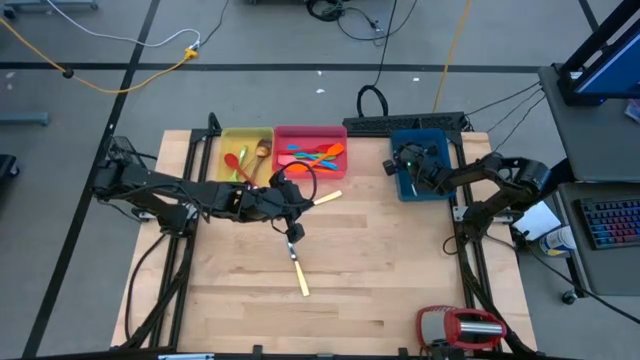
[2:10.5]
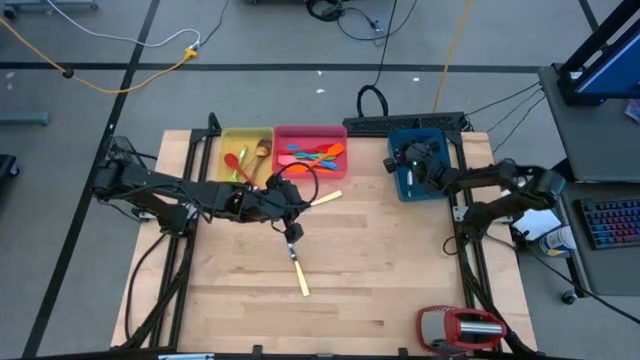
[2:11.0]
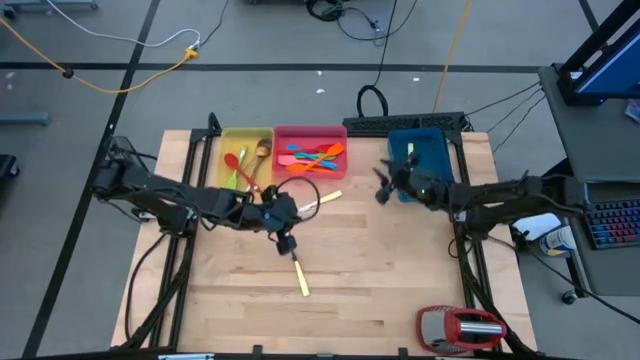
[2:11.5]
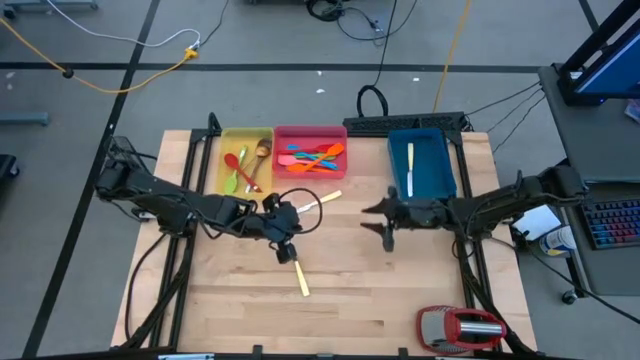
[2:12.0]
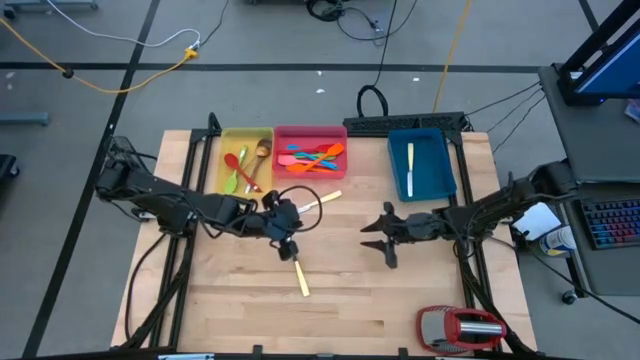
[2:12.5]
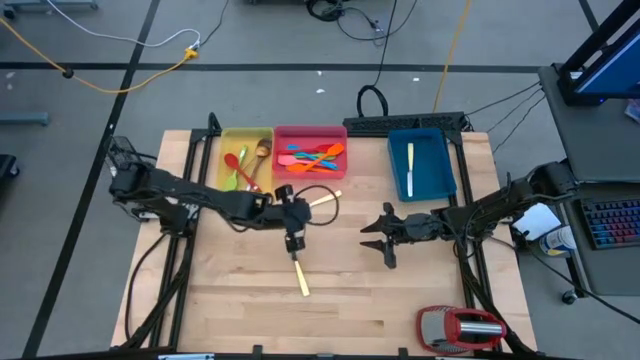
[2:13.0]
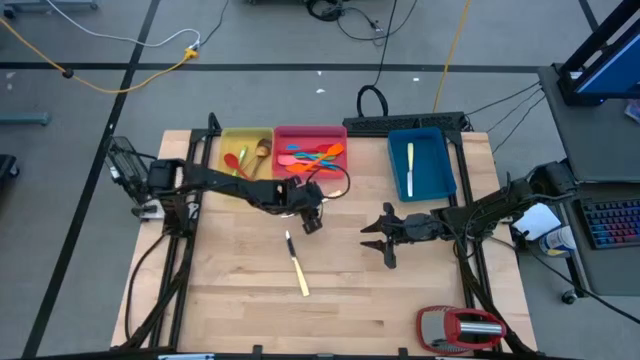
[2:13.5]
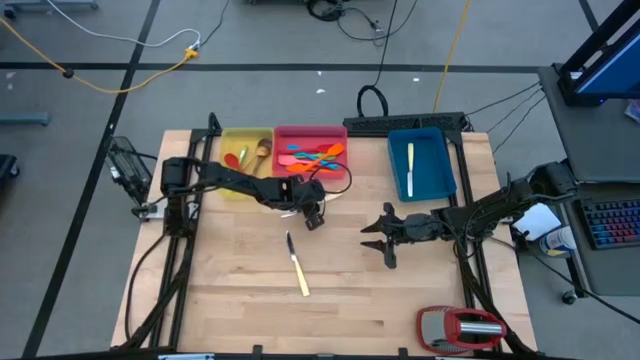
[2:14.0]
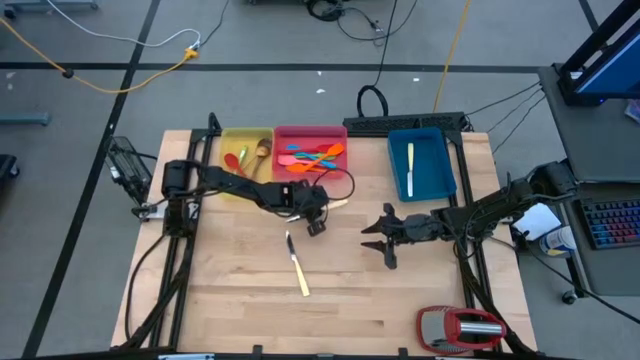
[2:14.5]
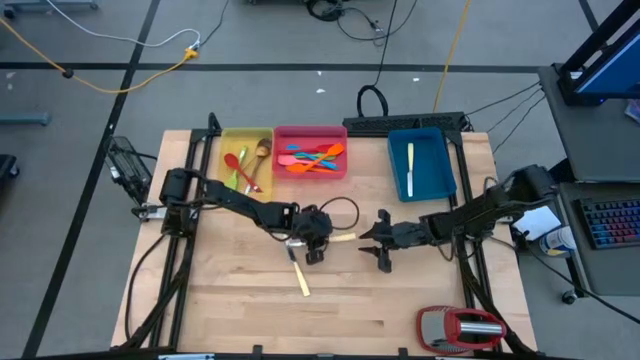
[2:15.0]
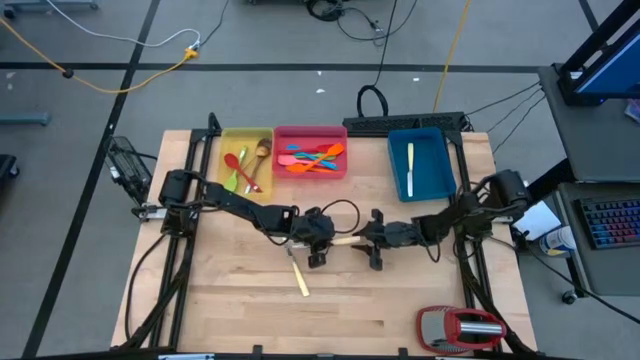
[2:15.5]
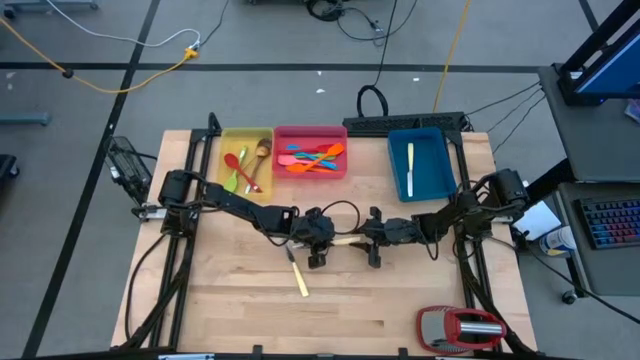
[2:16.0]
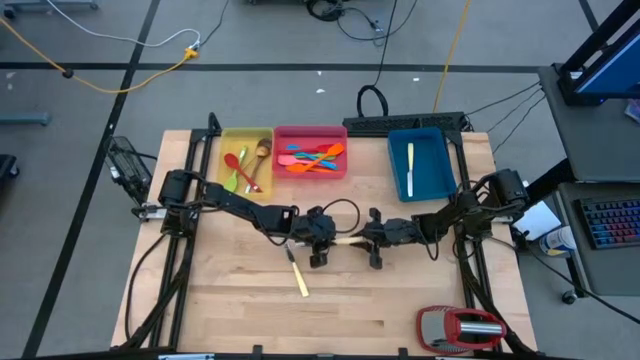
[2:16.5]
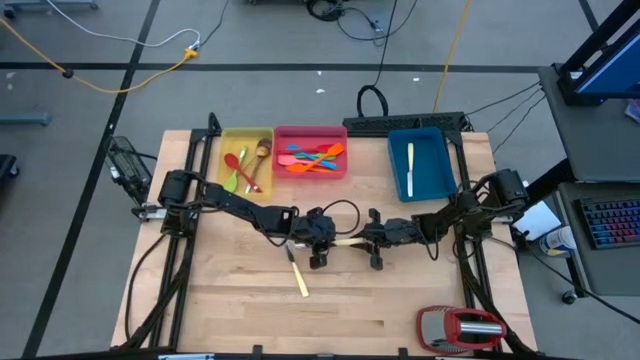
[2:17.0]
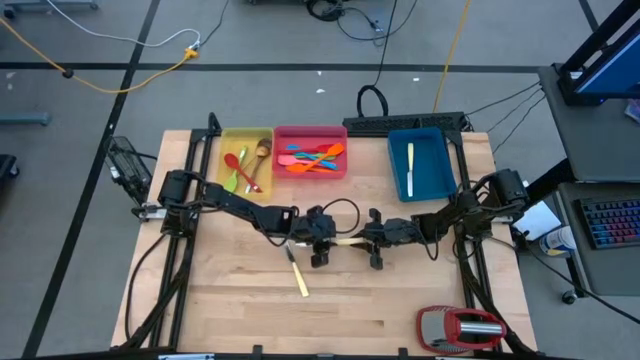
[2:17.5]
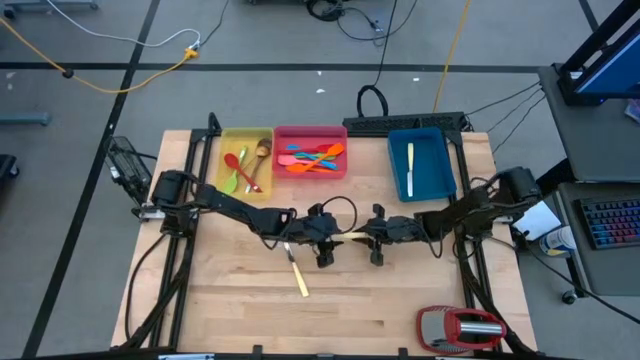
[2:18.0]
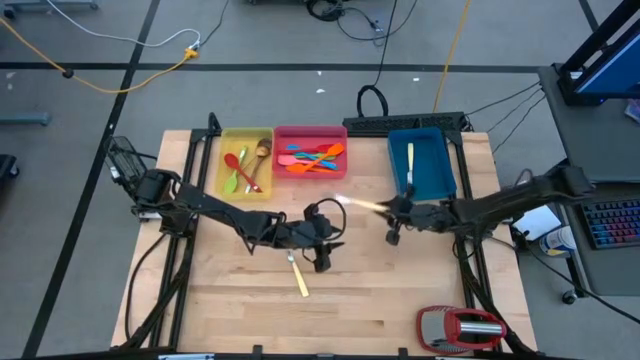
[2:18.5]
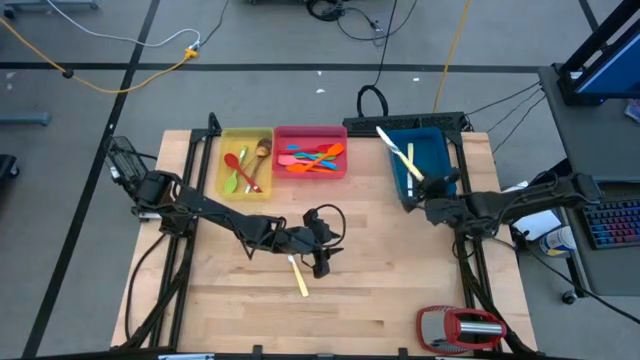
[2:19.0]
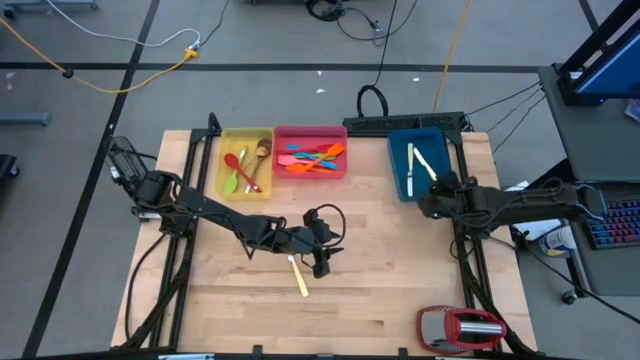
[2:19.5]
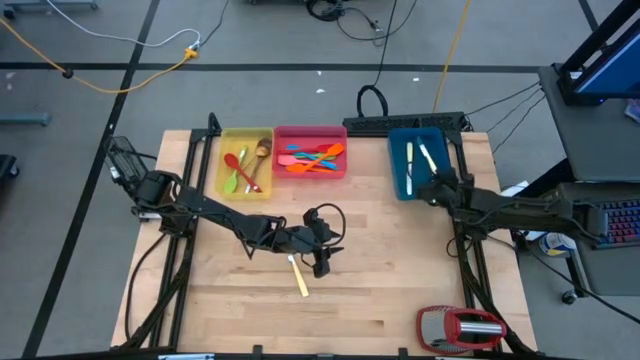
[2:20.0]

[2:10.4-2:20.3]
Task: Pick & Place Kitchen Items
Put the top yellow table knife into the blue bin

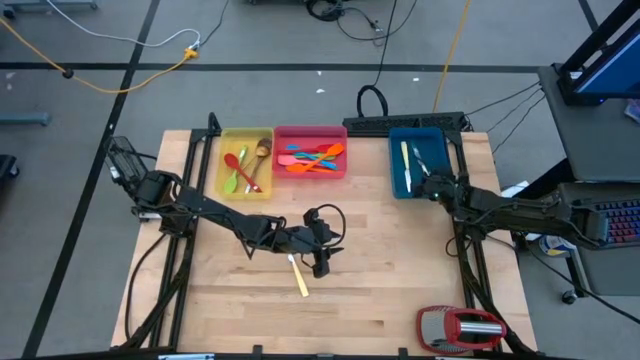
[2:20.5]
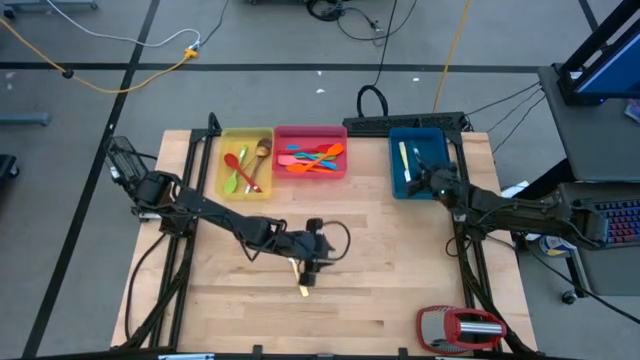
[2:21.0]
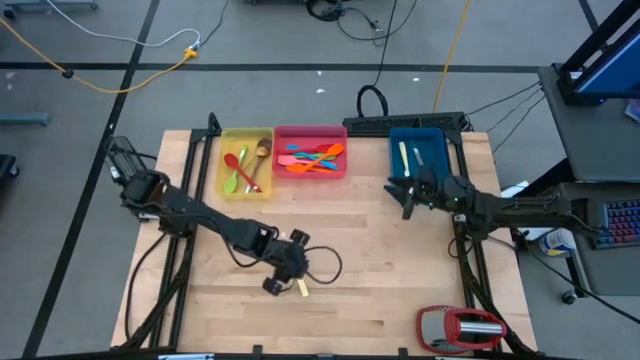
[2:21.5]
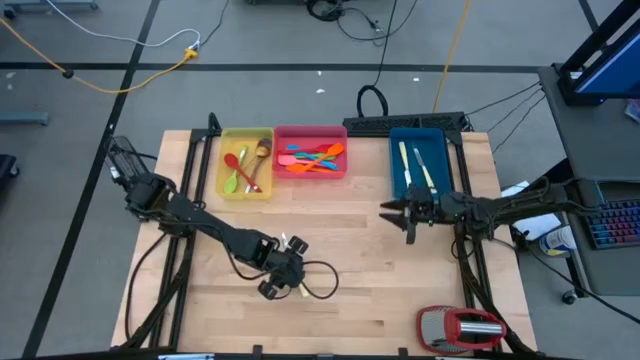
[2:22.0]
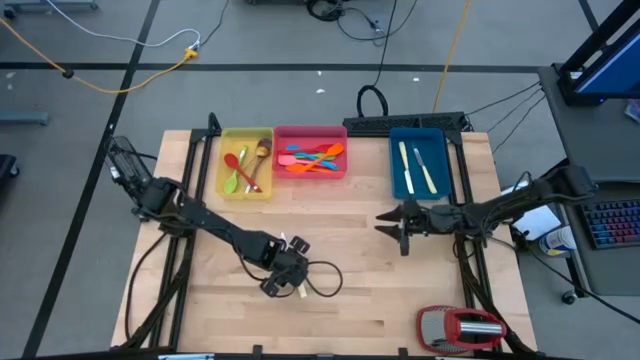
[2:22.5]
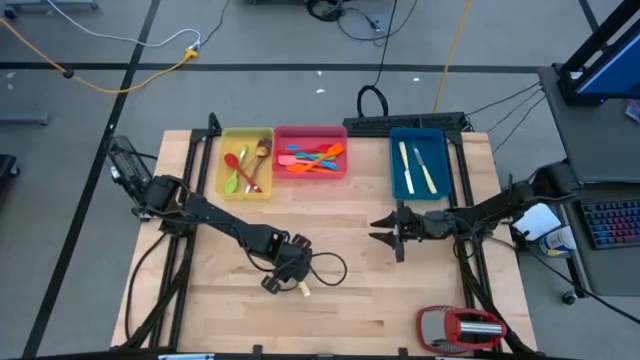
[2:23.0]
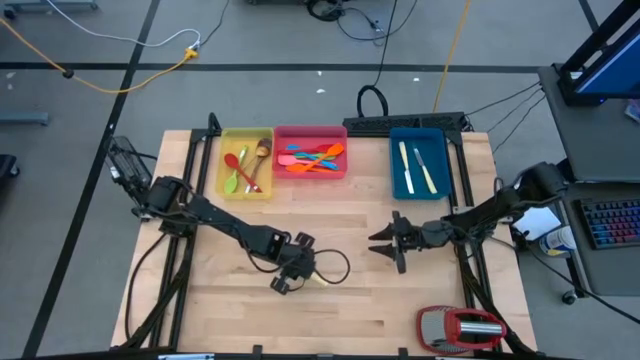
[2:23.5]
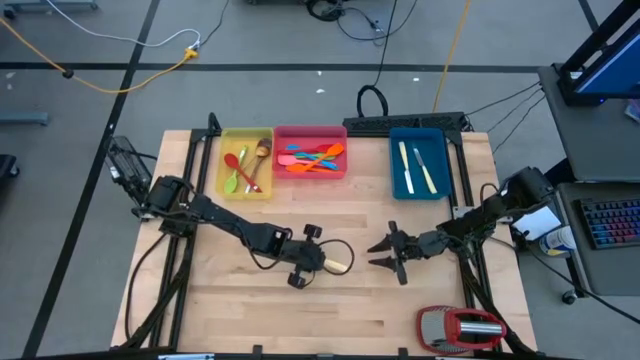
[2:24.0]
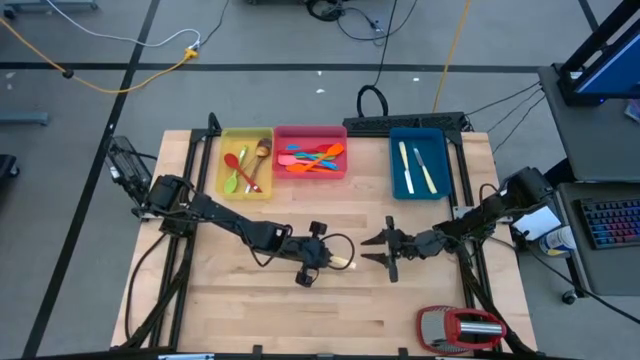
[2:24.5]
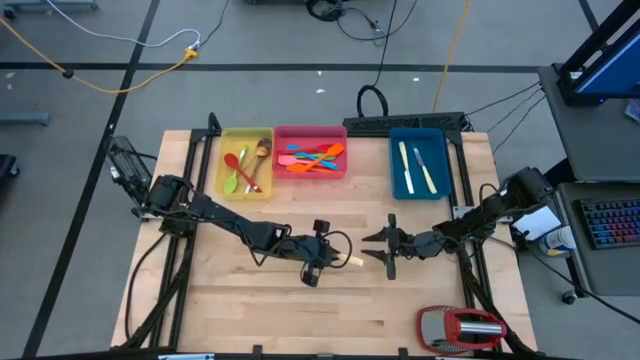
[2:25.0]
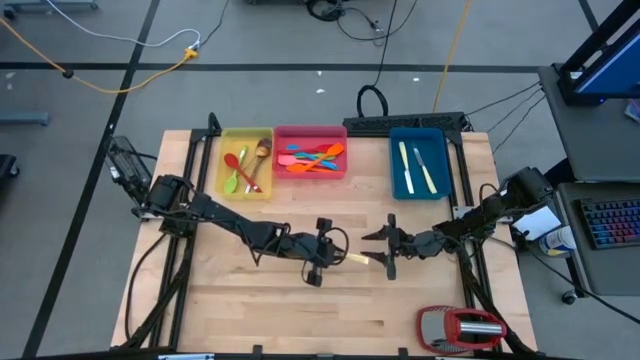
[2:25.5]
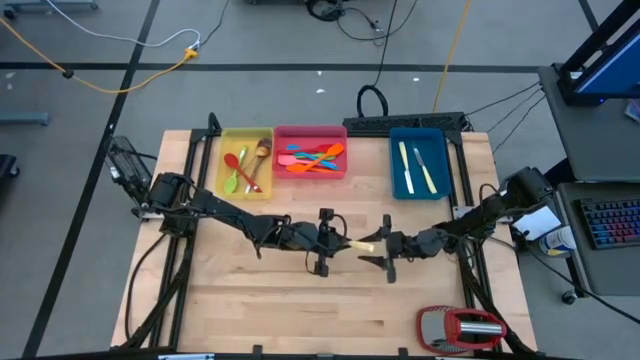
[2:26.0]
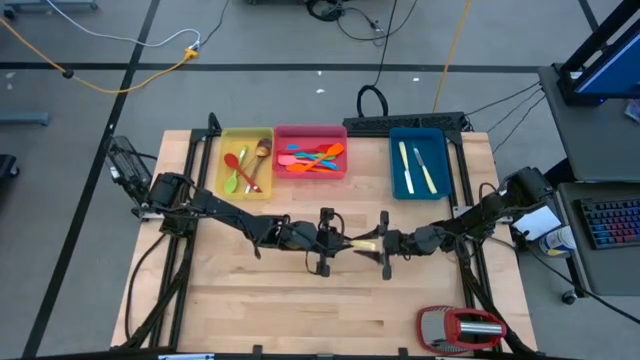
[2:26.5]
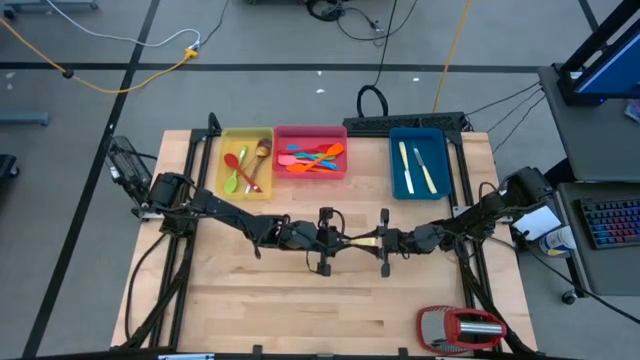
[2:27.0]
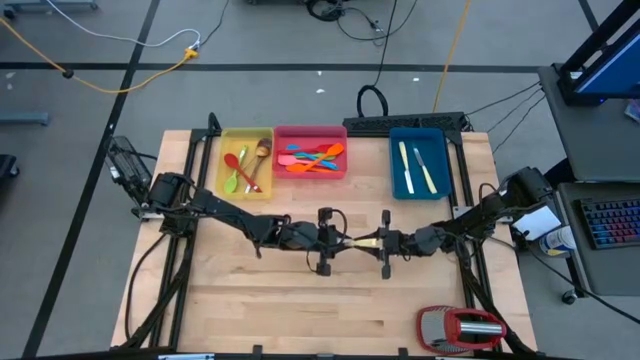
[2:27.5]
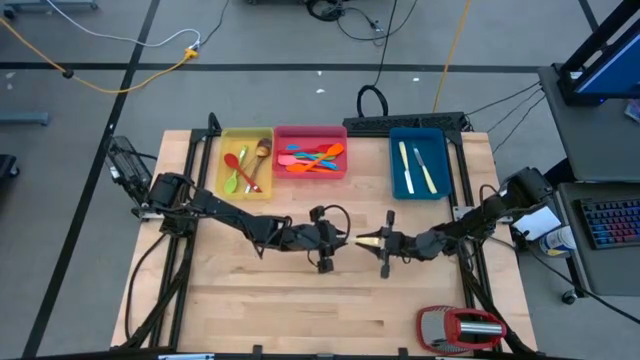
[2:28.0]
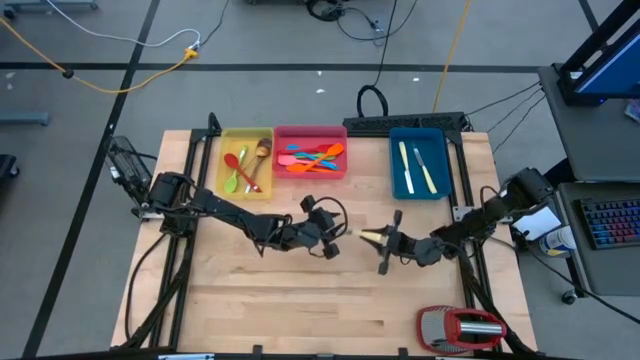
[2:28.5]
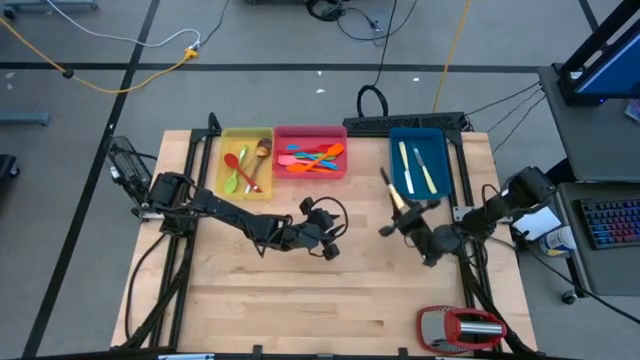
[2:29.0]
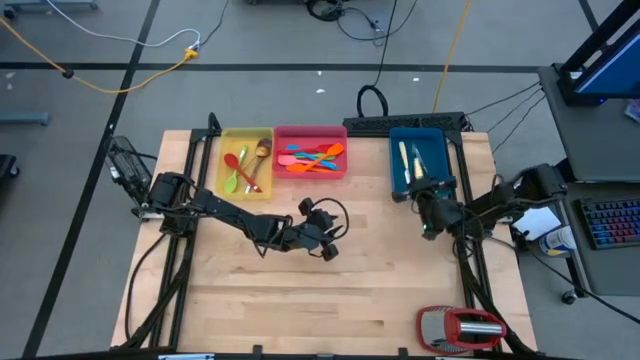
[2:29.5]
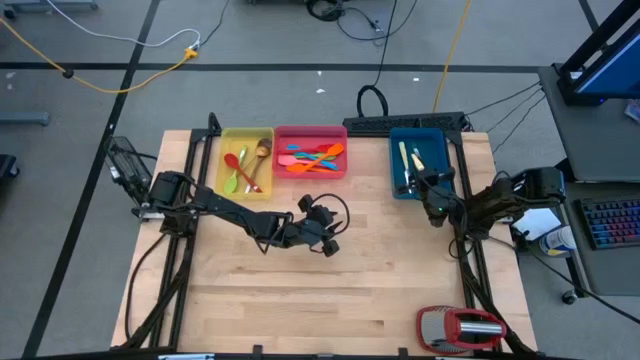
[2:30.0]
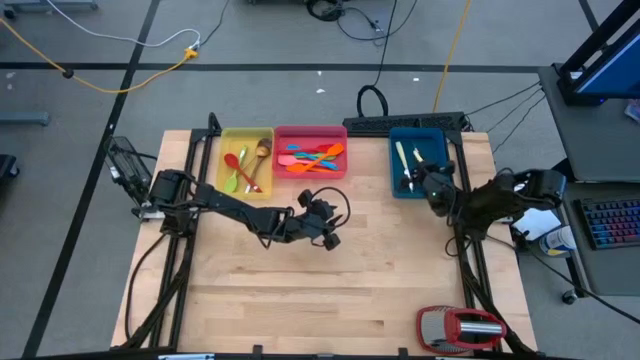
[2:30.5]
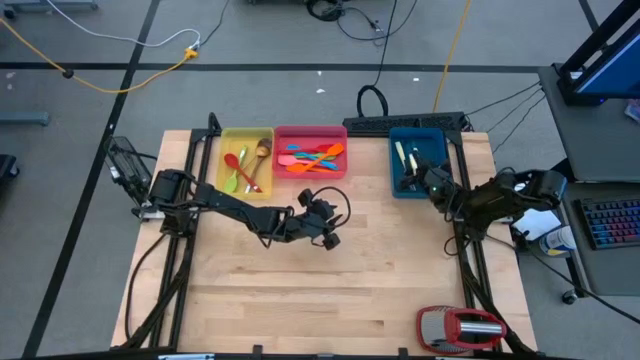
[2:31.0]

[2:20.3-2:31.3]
Put the yellow table knife into the blue bin
